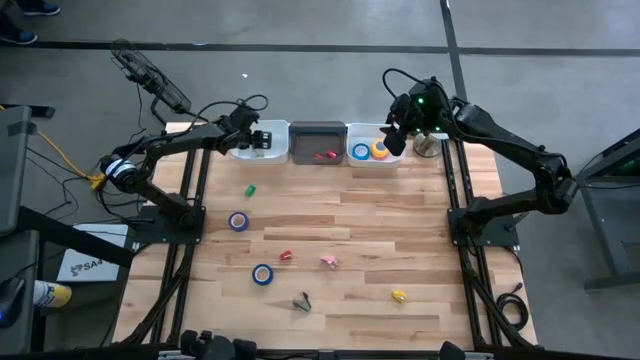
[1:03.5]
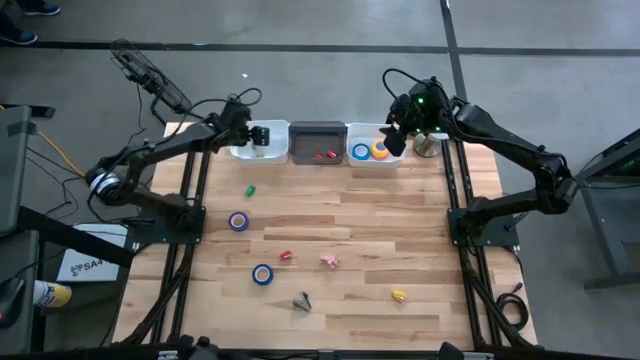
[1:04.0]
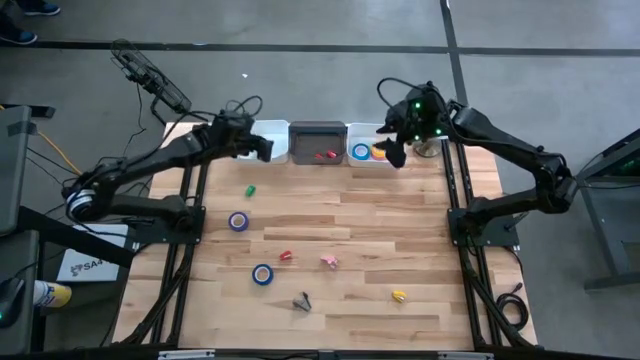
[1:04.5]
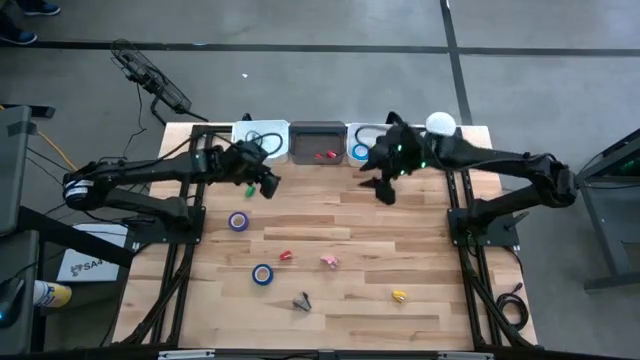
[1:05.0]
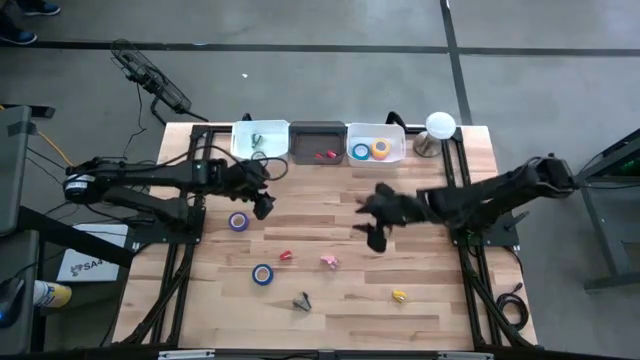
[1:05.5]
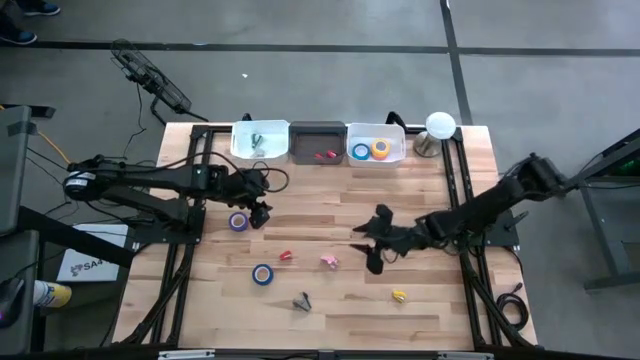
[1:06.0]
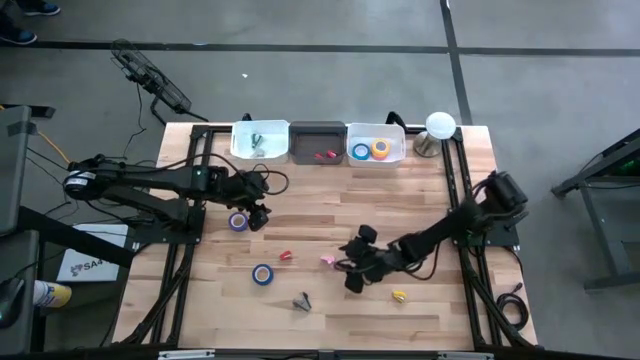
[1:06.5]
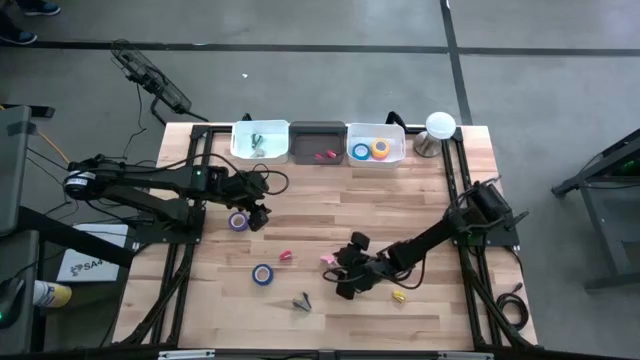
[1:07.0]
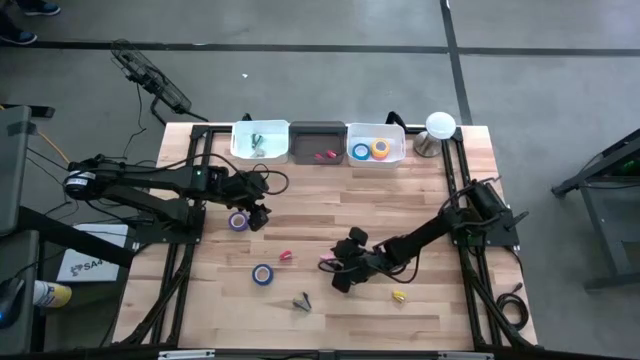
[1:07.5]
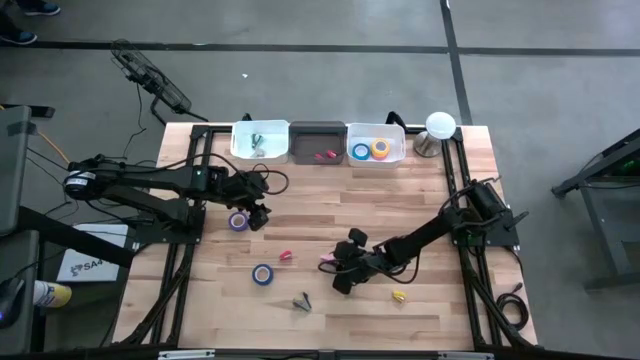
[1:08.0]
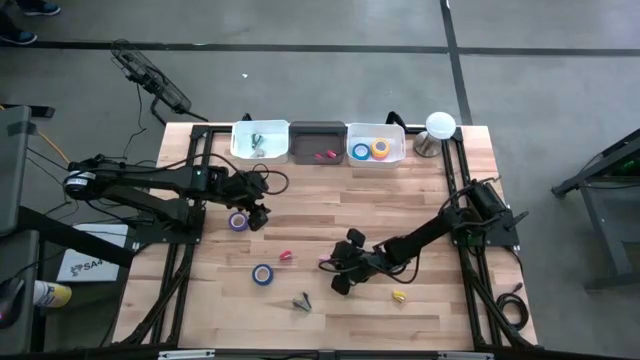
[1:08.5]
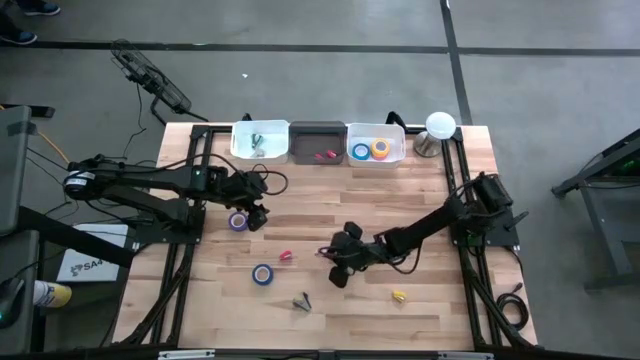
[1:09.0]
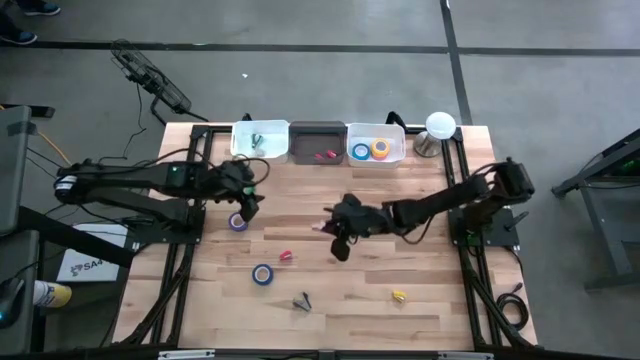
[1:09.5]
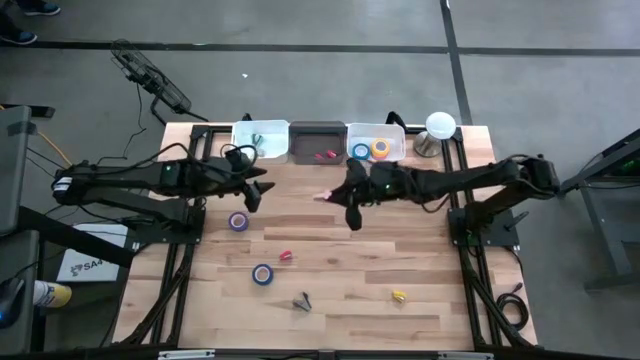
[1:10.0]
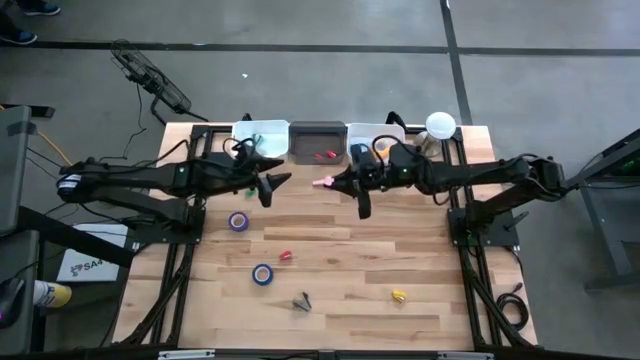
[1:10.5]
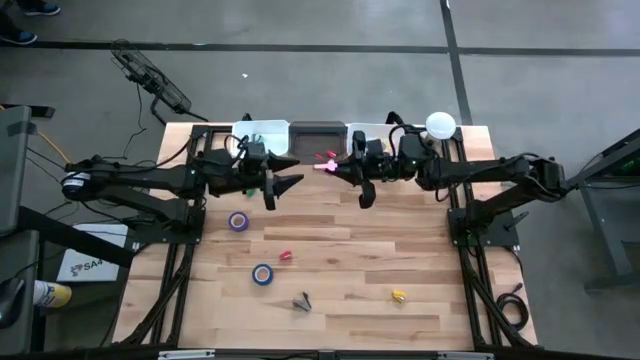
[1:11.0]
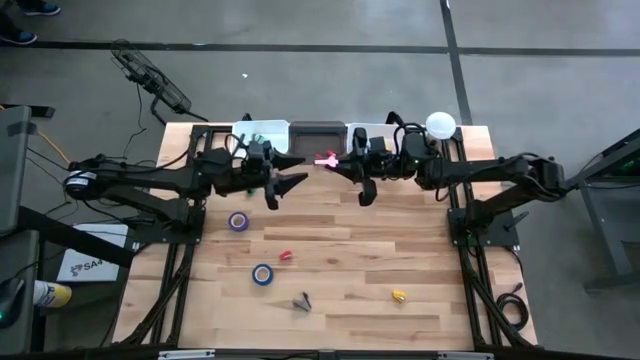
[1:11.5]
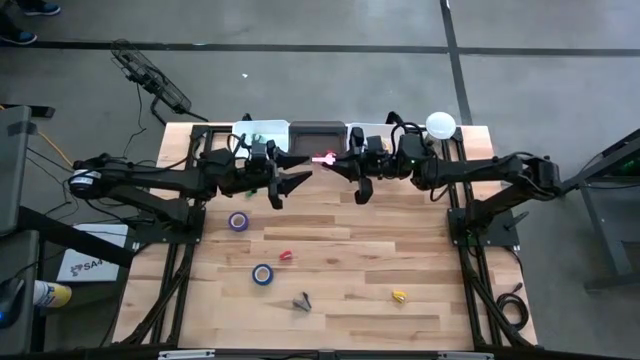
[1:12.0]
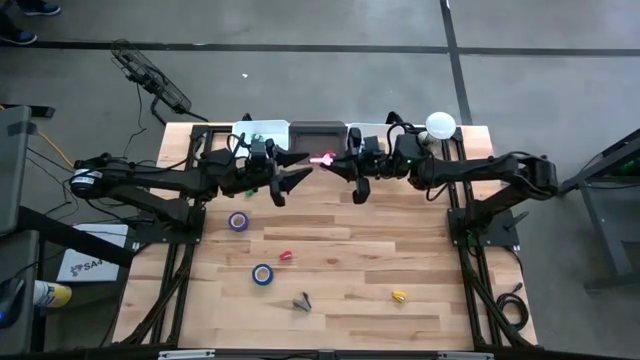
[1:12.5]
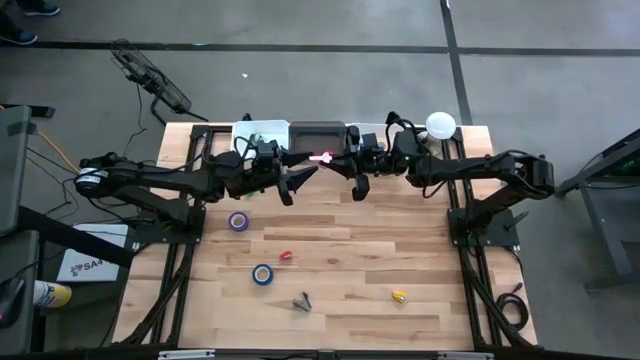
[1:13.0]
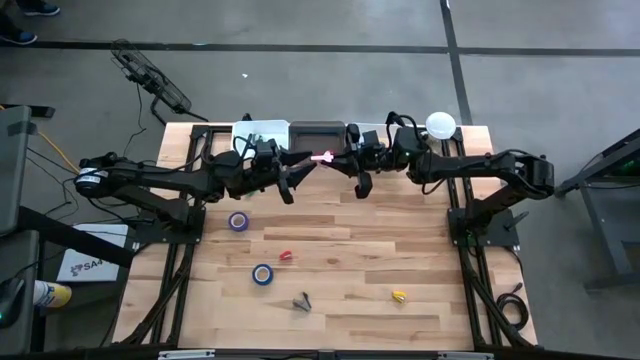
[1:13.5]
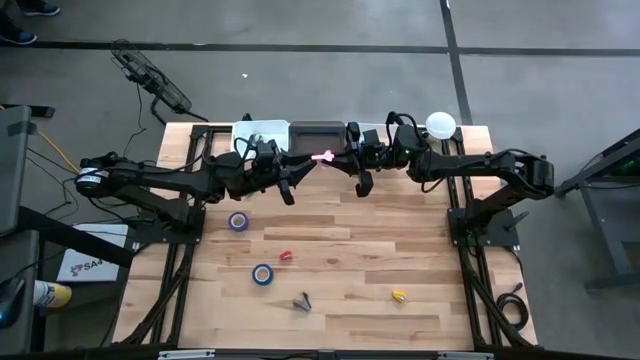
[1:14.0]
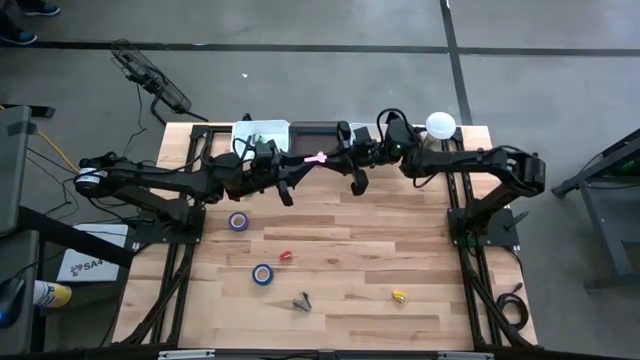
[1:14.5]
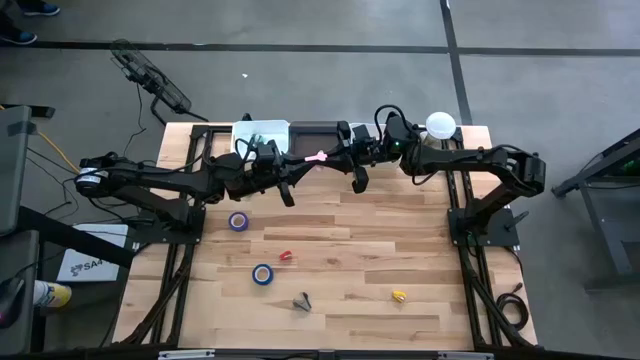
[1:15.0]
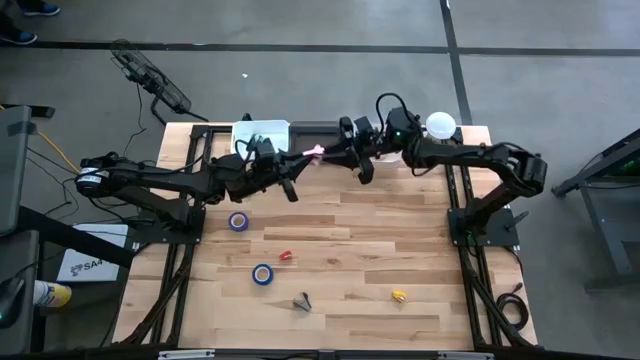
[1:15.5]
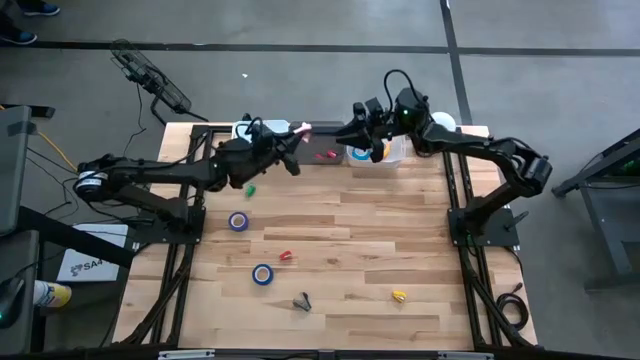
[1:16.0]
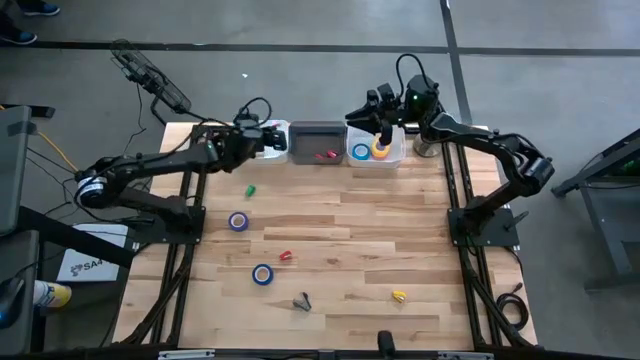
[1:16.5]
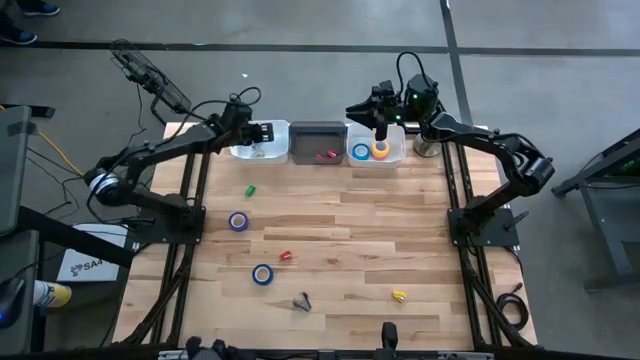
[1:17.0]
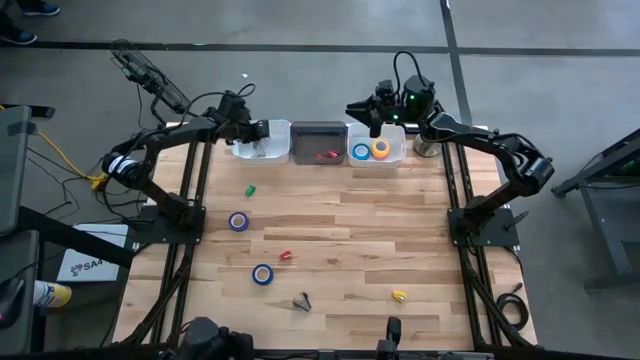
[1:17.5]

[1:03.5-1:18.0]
Task: Pick and place Stapler, Stapler remover, tape
Put the pink staple remover into the left white bin

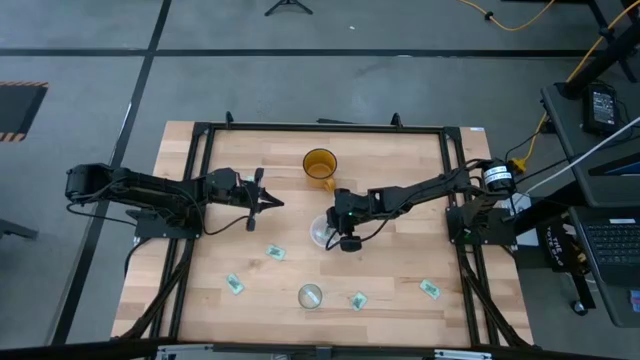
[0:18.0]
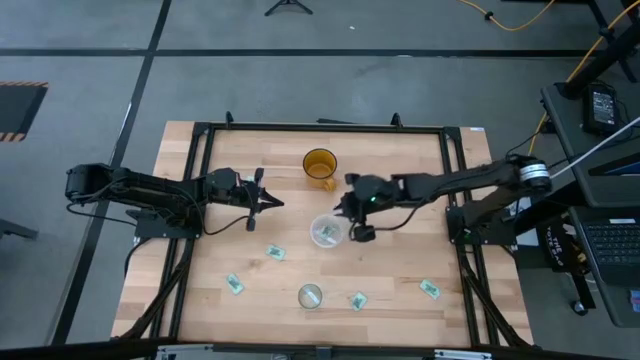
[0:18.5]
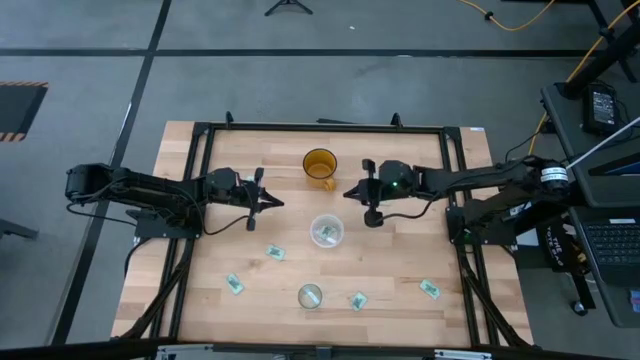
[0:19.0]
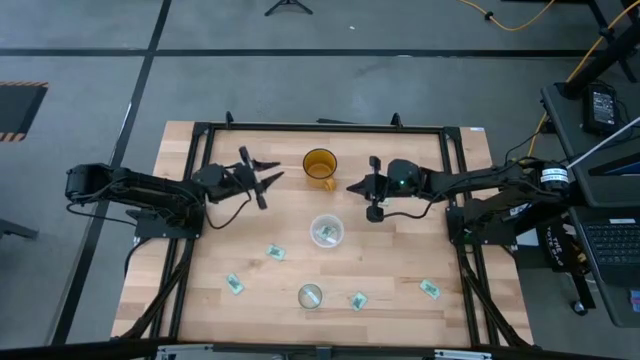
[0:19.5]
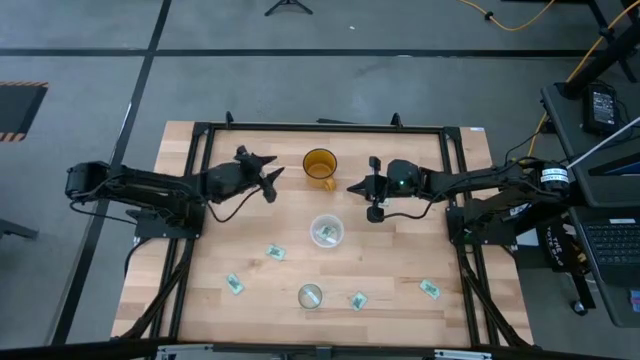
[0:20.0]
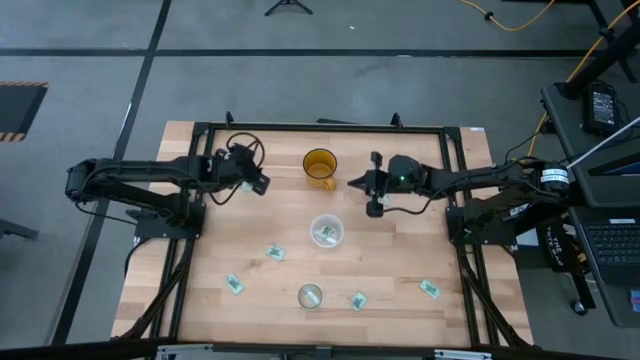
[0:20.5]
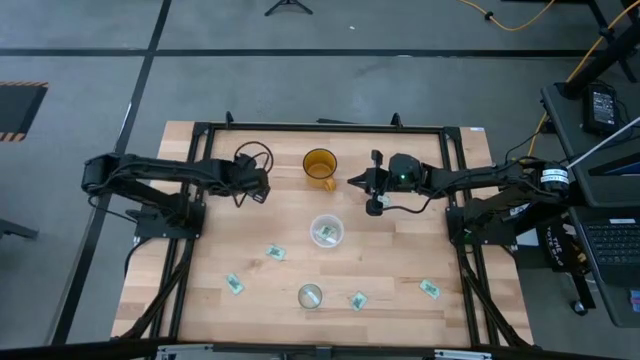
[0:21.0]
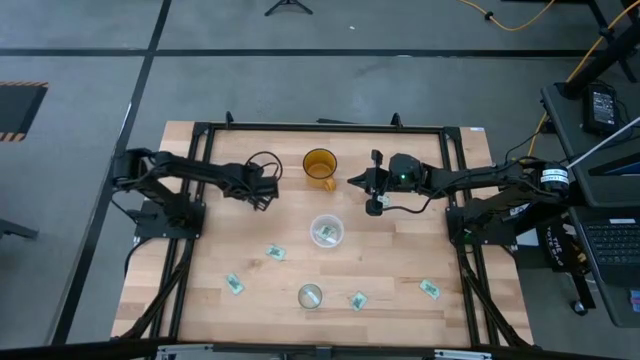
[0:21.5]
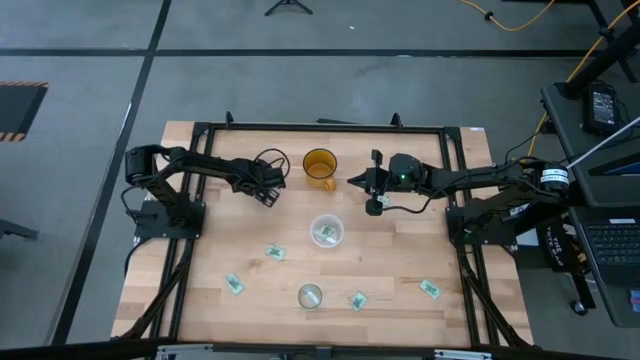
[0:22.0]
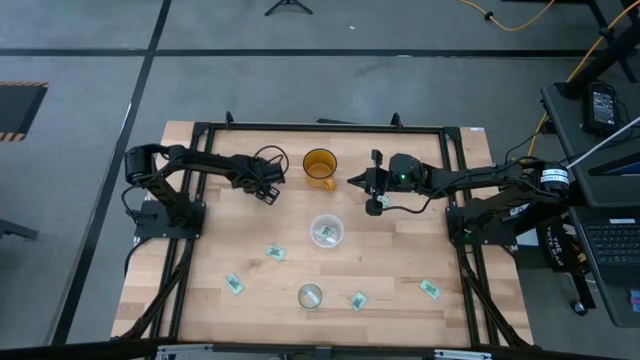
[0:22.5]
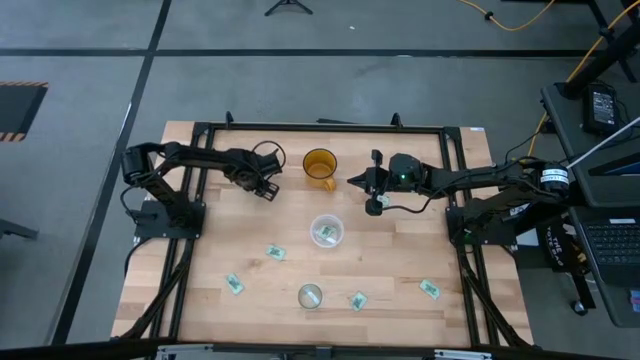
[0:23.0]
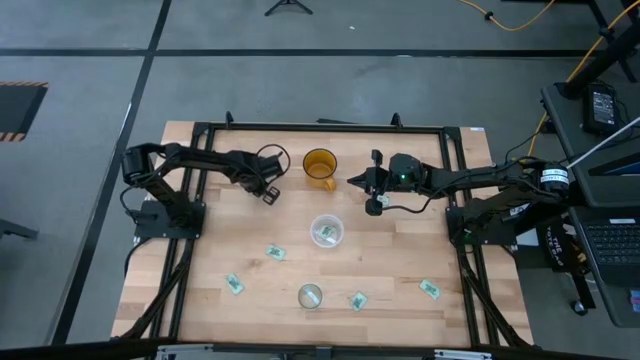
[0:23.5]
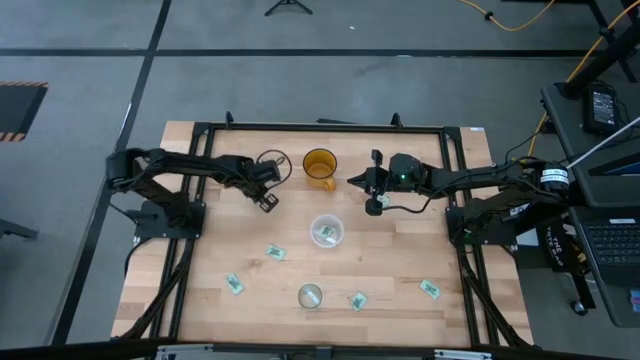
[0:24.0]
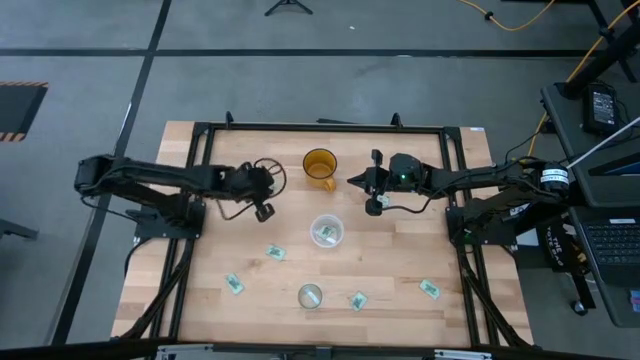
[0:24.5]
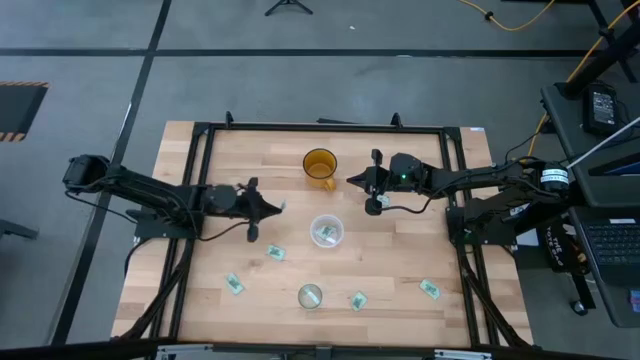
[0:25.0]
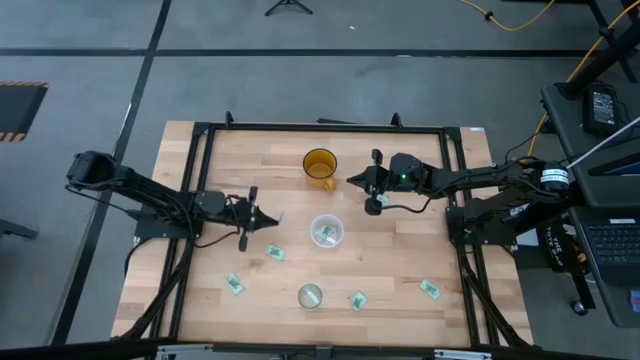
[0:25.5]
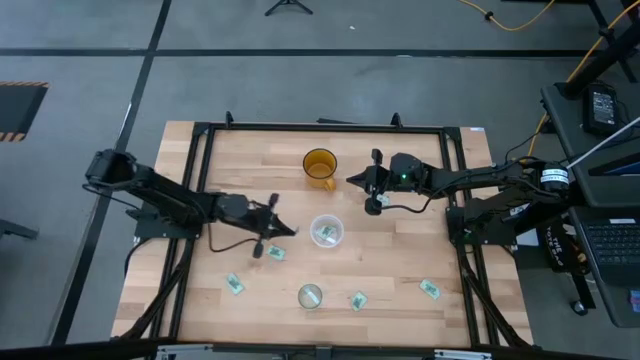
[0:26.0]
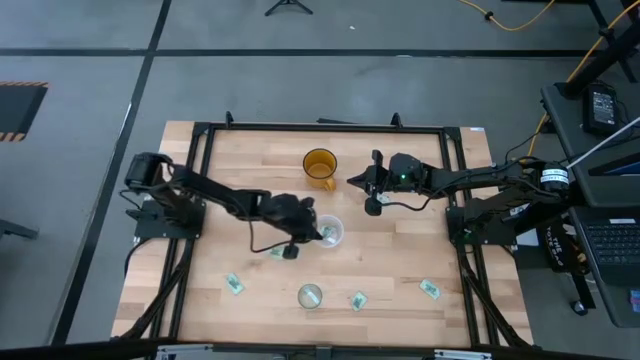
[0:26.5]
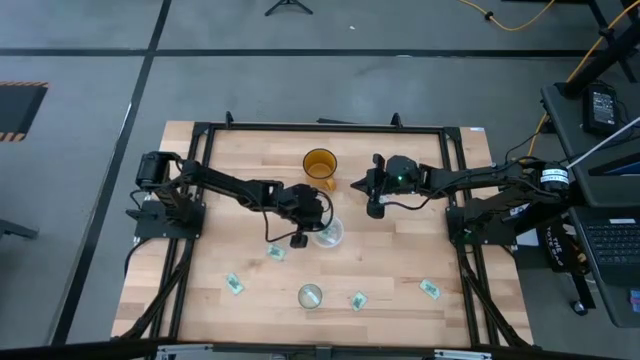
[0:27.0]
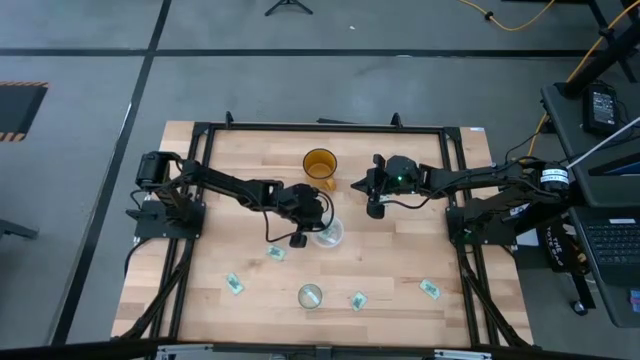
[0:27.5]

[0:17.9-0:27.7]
Task: Pick and place Stevia / Truvia into bins
Put the stevia packet into the transparent plastic container
